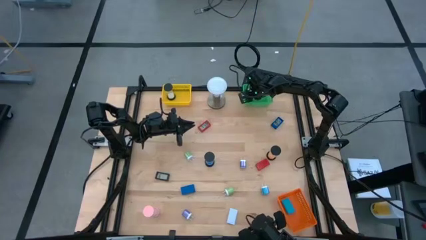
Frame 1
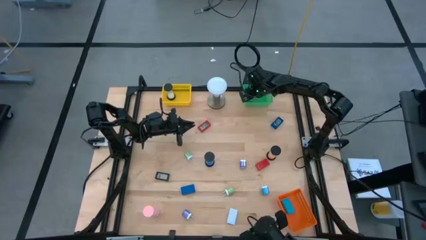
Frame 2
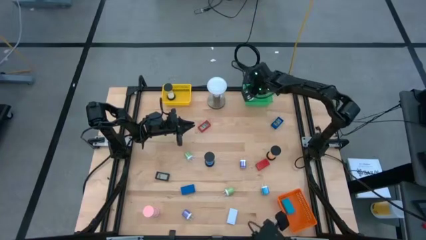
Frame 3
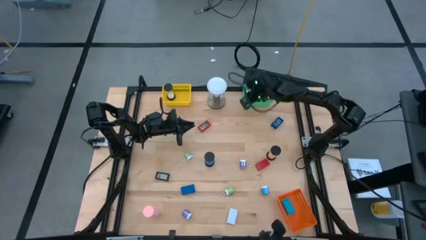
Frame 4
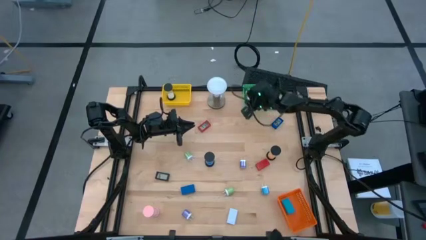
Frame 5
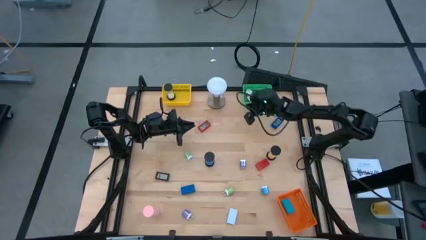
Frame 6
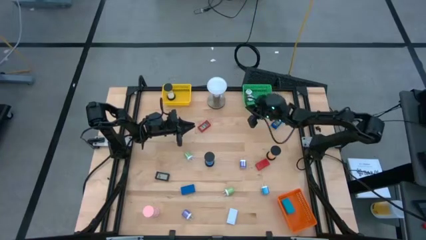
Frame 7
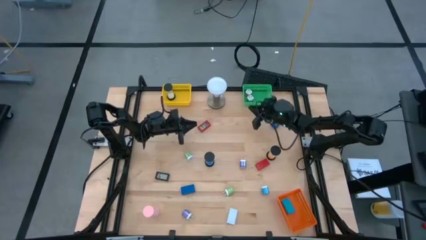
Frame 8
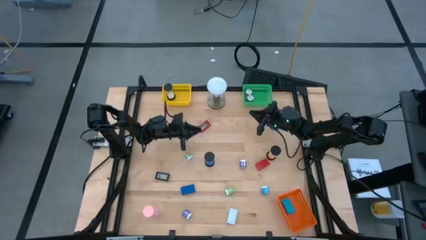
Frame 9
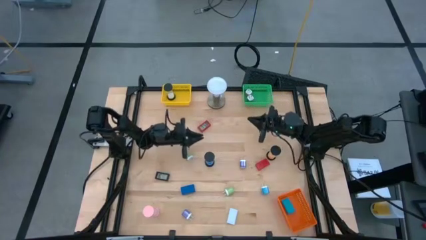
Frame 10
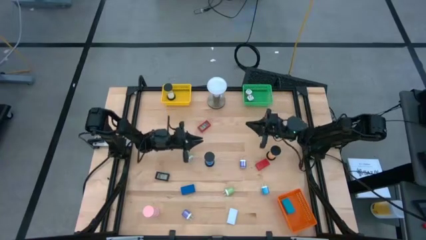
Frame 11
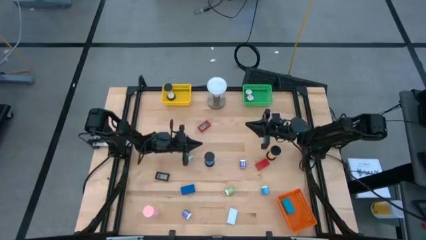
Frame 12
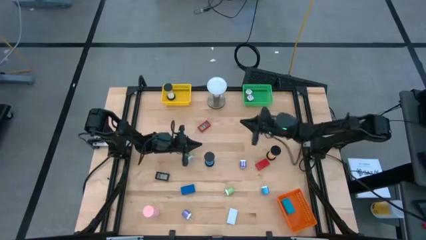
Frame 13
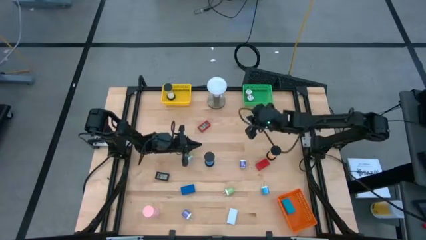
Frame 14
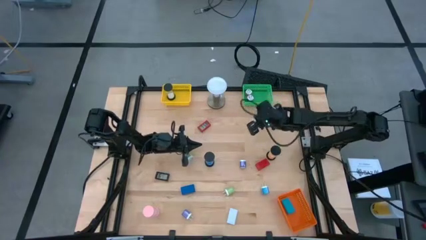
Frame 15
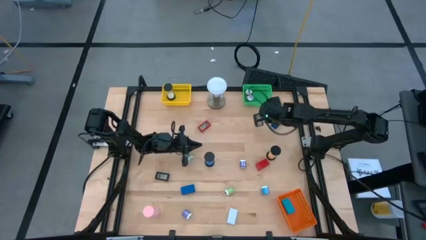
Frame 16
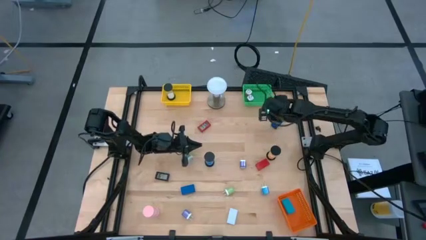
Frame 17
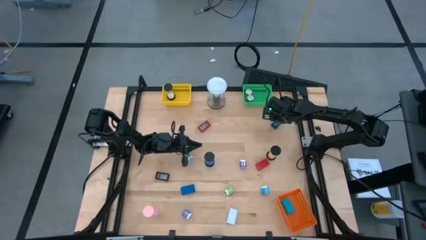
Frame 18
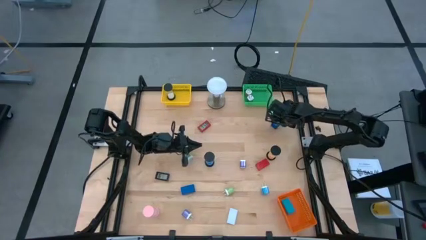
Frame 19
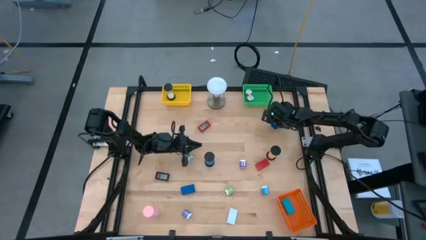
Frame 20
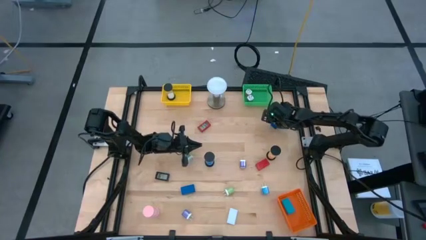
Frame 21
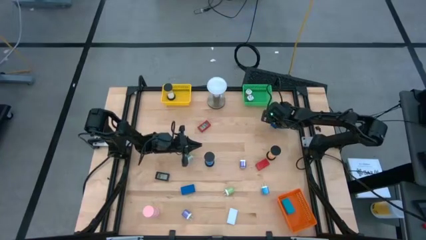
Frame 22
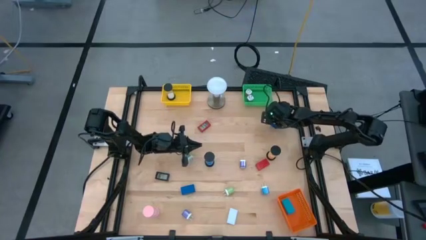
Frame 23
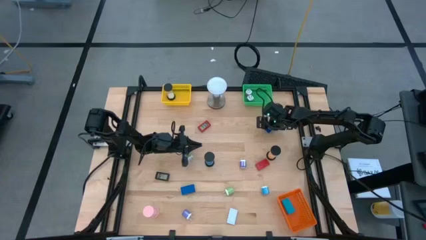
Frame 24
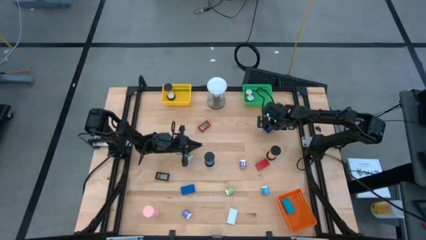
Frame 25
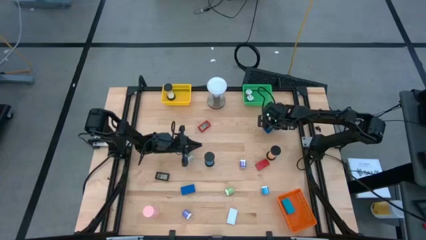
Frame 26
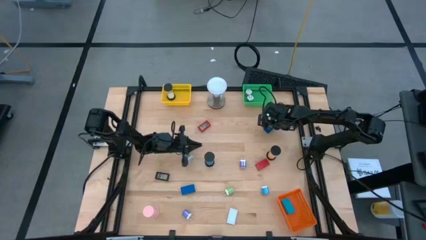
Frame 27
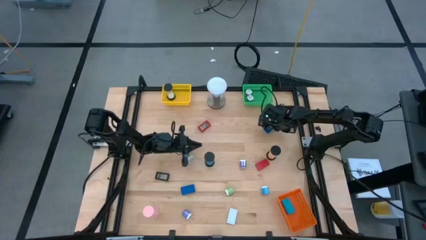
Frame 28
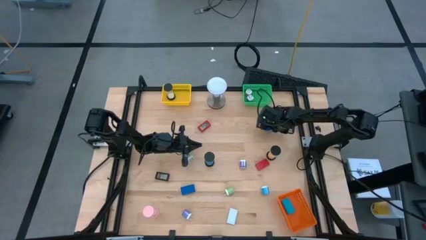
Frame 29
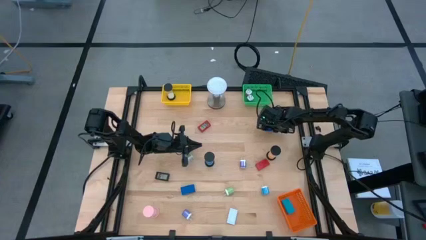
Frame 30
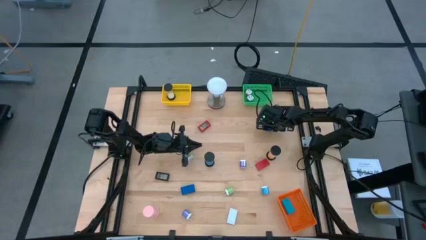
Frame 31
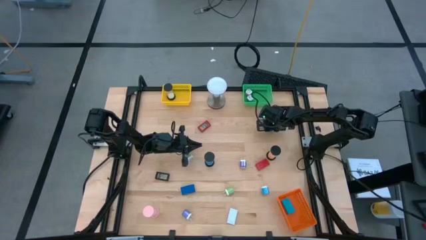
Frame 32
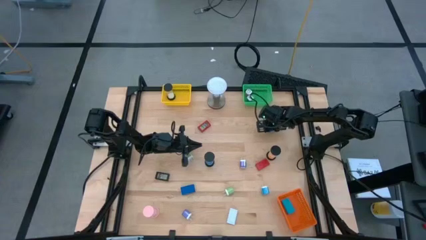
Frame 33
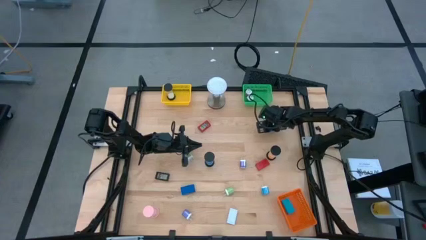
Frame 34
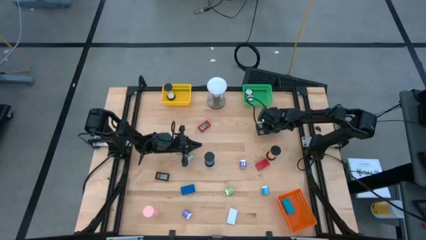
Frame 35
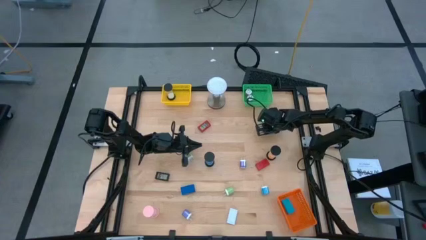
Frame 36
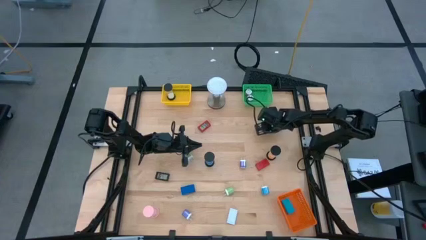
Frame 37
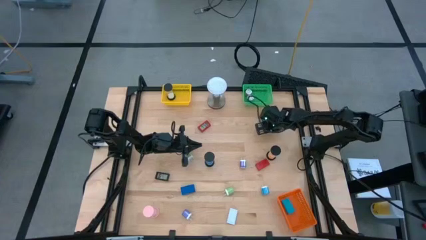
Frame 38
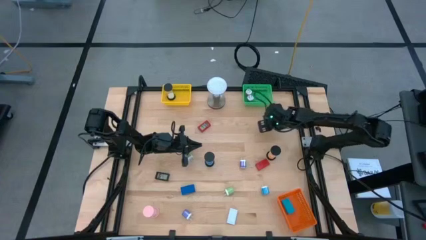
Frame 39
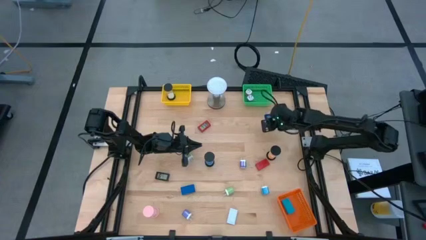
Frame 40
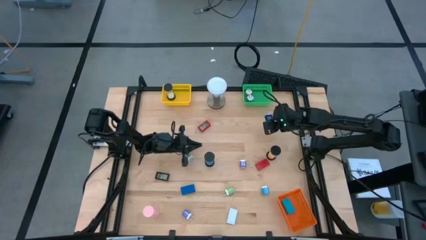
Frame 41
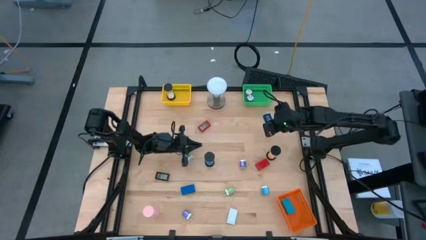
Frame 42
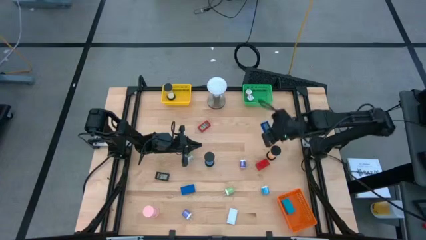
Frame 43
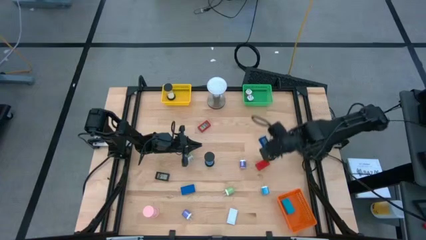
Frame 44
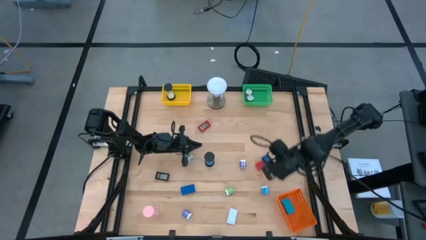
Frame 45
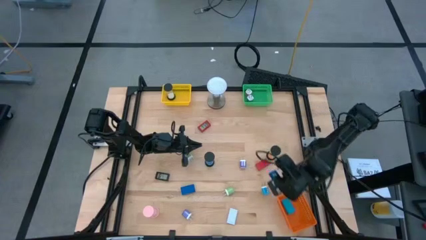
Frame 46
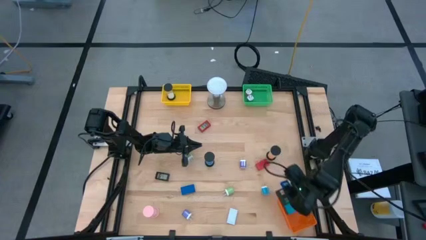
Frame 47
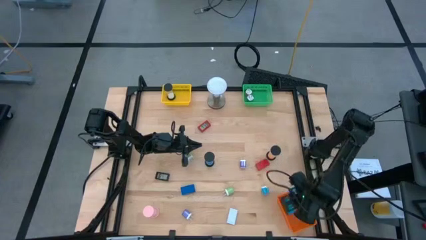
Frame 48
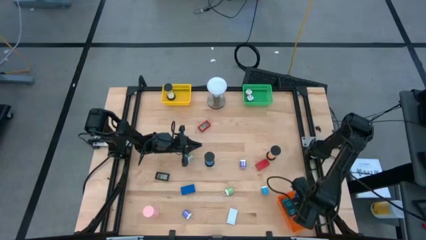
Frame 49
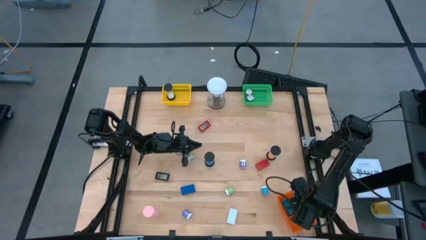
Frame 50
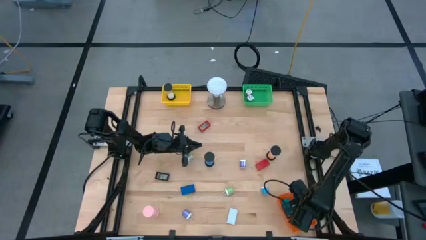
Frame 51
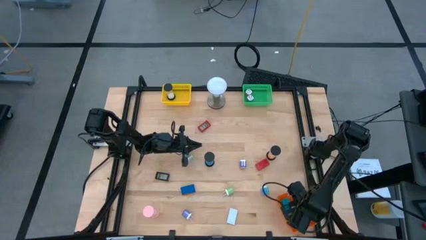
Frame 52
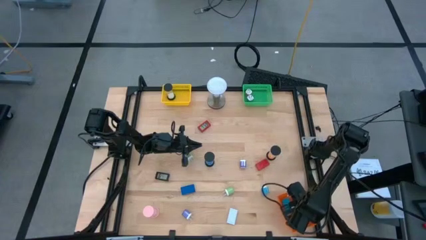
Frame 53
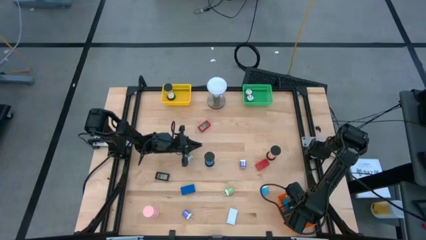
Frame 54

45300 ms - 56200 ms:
Task: Pick & Place Office items
Put the top blue digital timer into the orange bin
